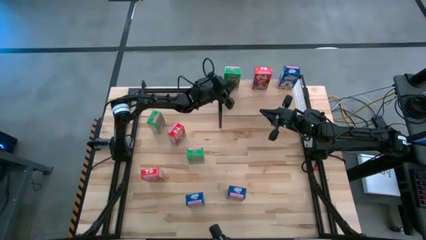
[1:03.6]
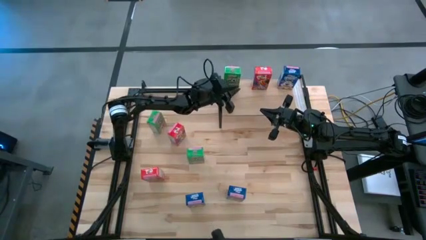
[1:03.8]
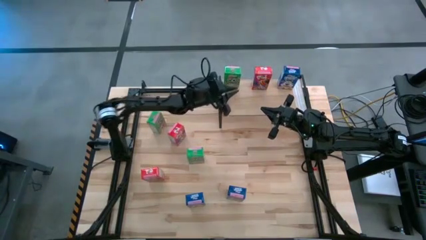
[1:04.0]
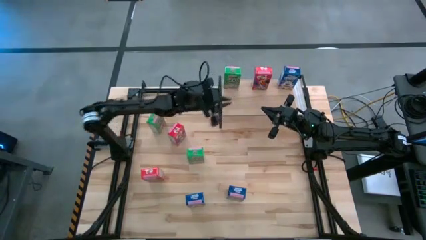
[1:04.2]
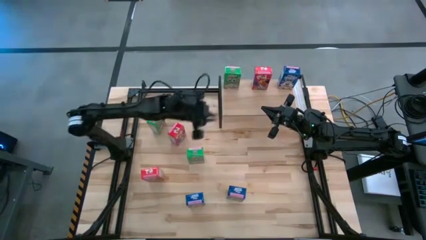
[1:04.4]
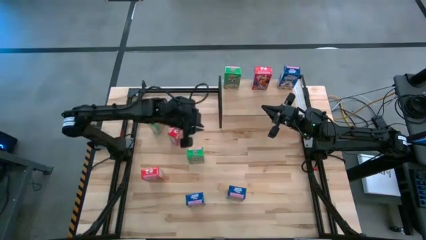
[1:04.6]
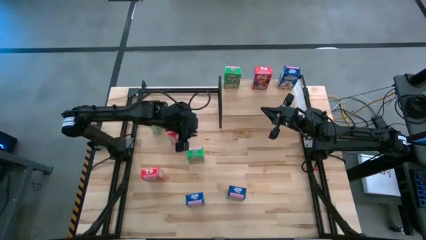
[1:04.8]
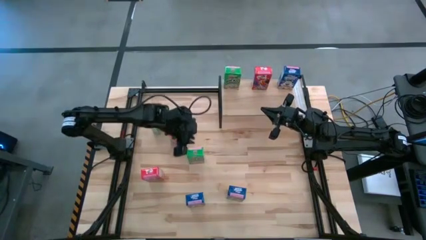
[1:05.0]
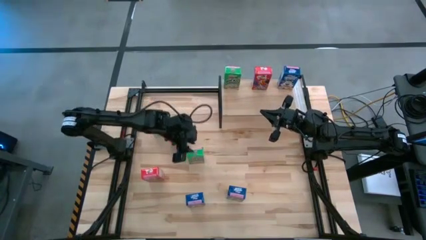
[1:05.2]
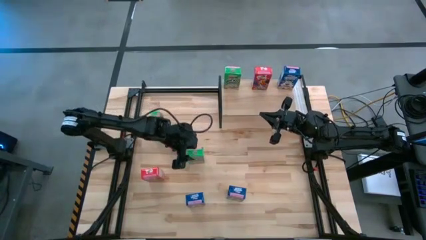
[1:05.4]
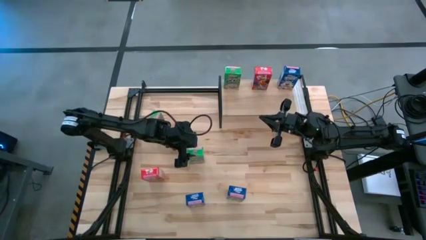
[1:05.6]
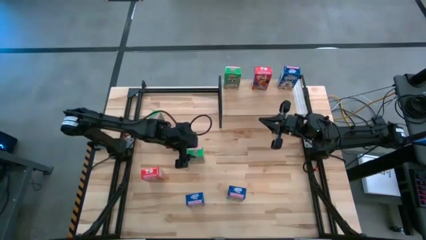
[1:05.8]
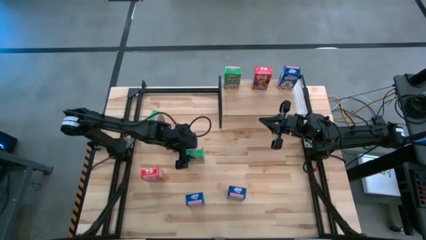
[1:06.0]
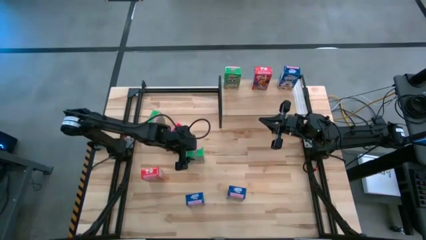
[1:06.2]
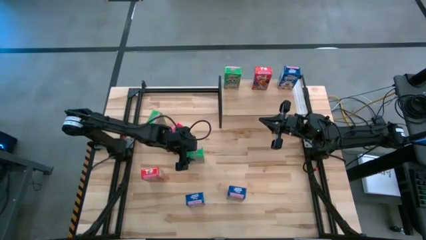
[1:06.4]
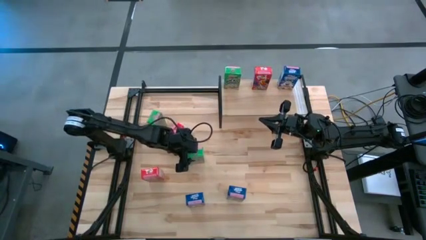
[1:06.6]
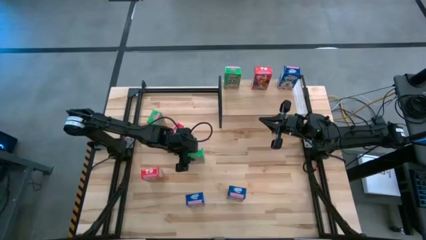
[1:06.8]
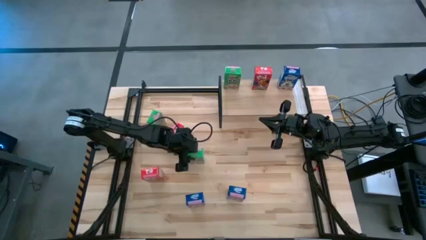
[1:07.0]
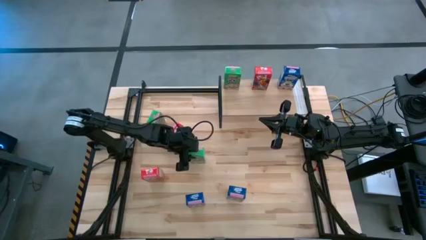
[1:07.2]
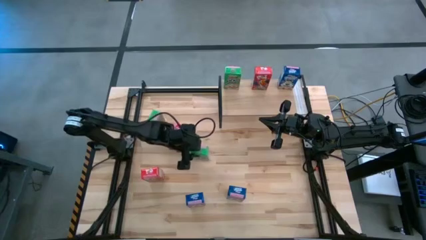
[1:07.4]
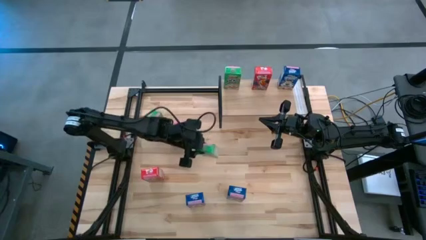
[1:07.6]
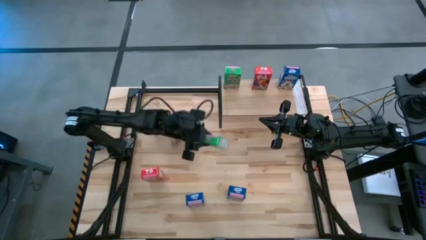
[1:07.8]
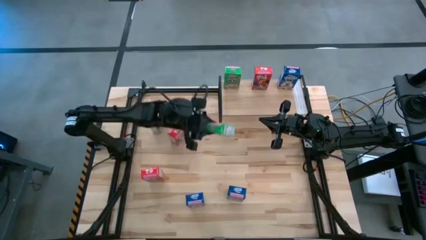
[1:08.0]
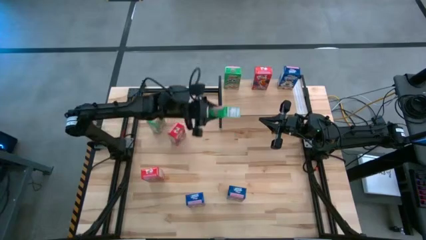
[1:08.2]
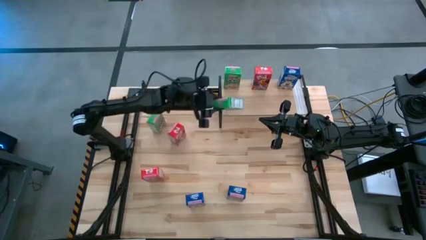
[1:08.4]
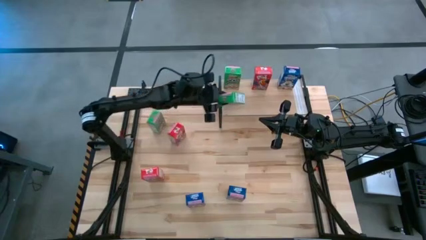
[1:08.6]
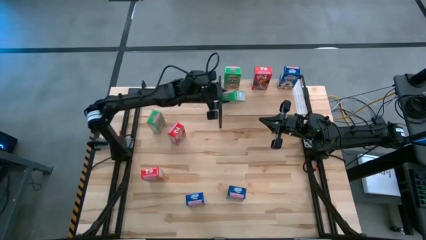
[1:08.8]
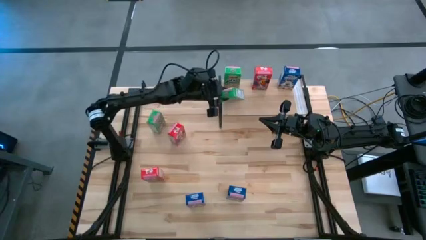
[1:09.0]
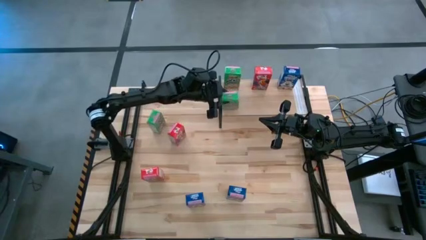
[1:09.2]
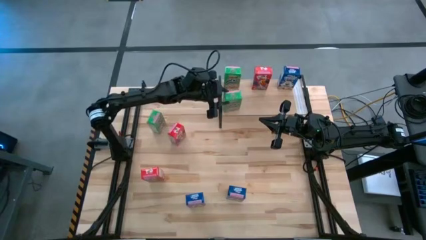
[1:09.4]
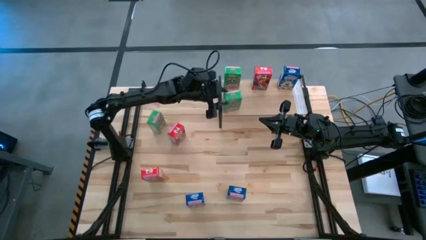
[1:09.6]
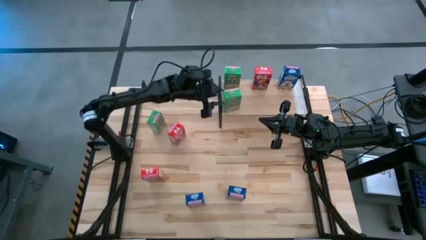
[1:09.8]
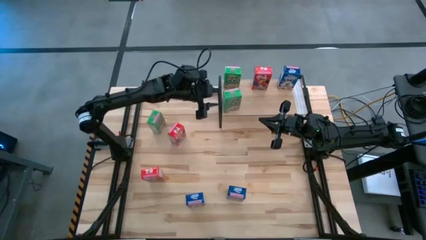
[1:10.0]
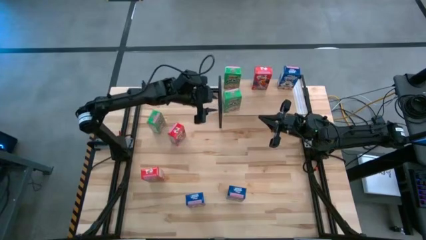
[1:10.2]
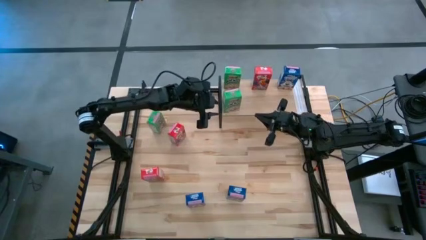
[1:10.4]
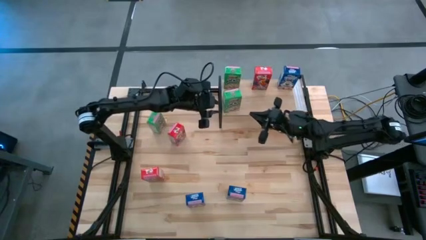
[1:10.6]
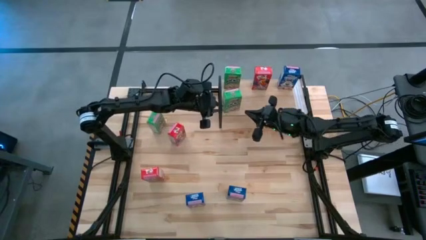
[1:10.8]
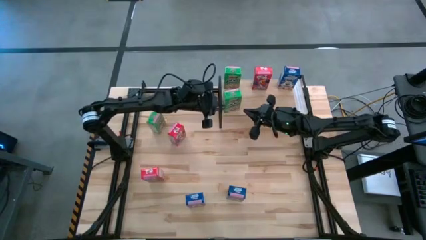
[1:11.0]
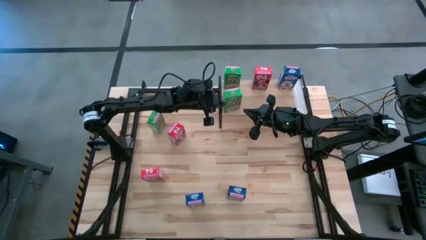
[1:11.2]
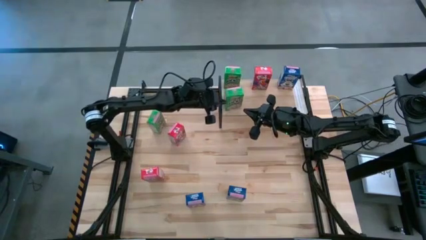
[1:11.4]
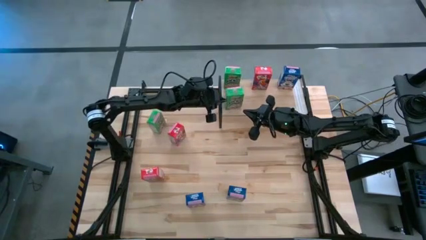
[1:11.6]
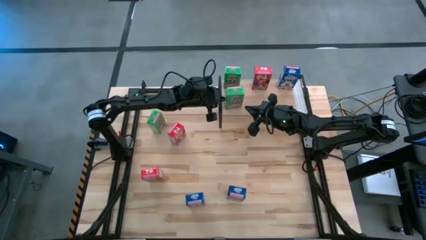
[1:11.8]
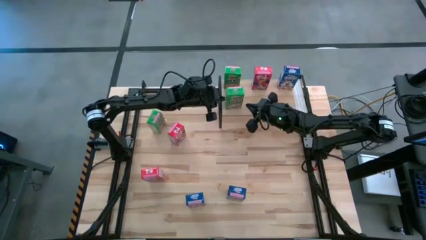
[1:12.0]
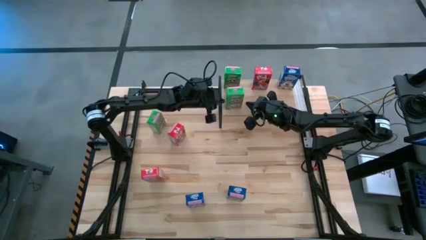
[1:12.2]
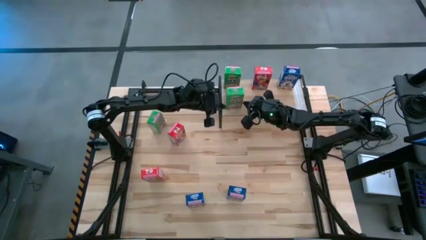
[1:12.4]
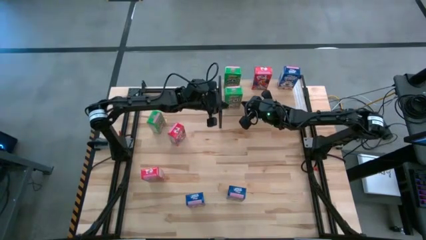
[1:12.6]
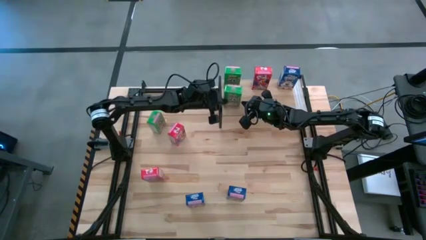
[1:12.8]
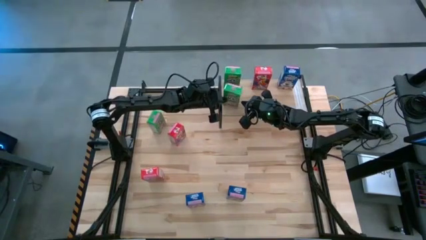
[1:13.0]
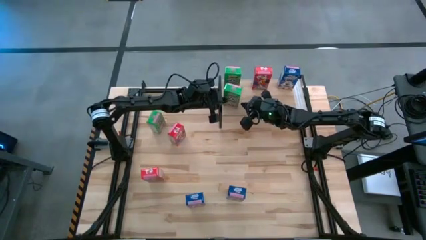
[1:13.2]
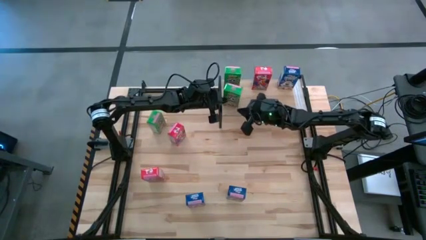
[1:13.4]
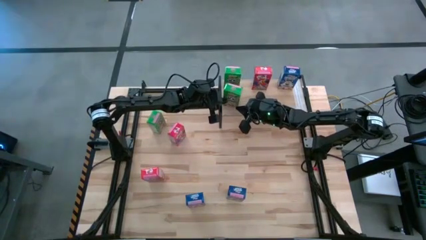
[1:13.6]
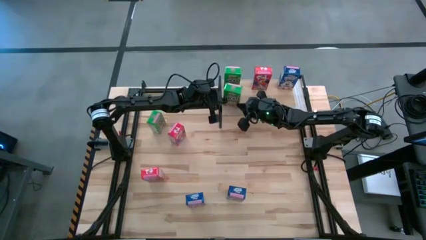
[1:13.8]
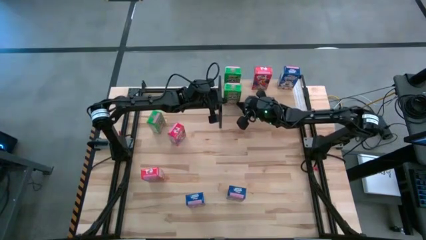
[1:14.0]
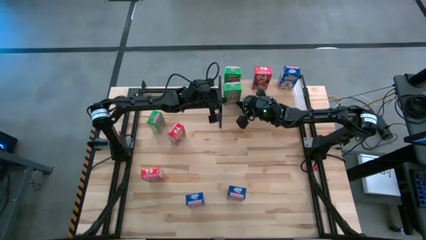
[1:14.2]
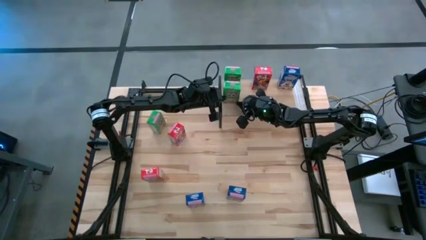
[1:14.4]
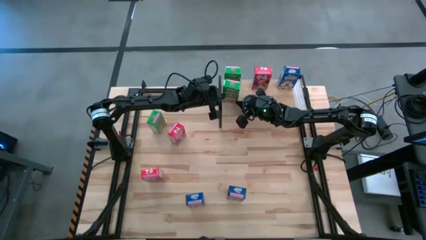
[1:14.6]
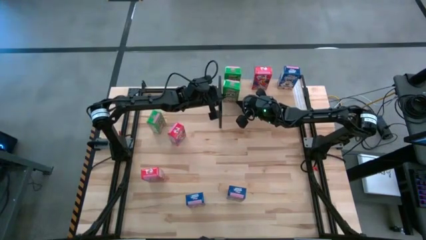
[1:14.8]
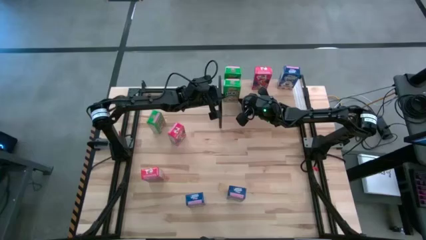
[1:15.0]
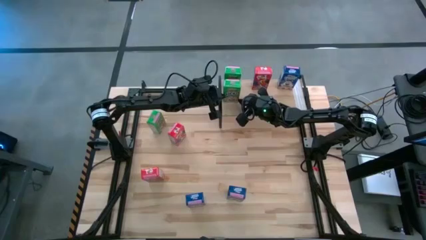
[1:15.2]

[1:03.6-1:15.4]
Task: Stack cereal on shelf
Put the bottom green cereal box on the shelf aligned with other green cereal boxes

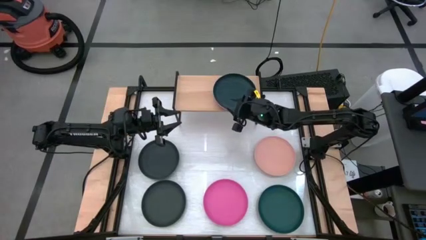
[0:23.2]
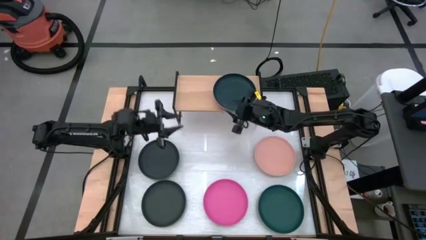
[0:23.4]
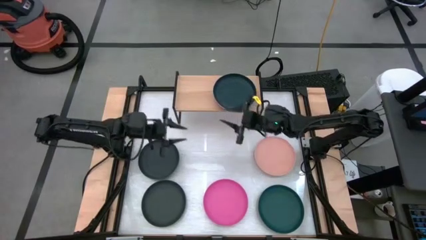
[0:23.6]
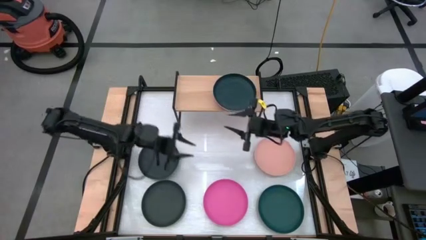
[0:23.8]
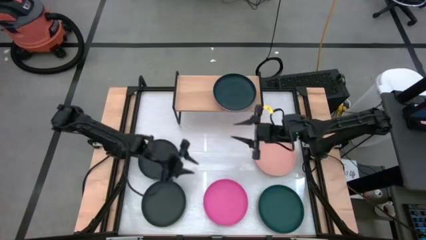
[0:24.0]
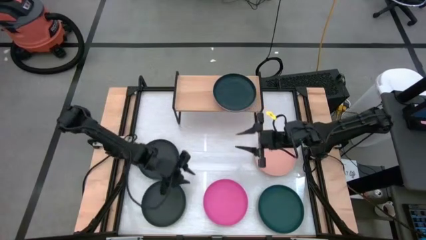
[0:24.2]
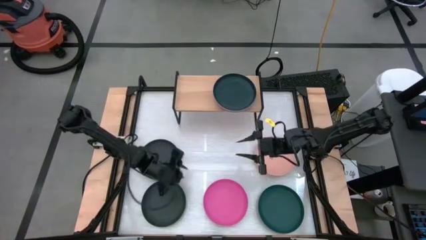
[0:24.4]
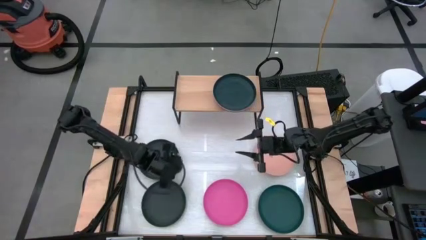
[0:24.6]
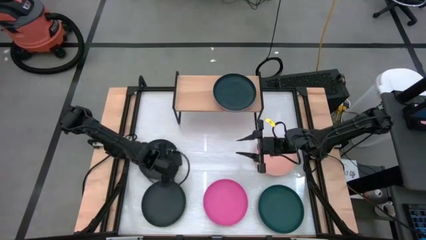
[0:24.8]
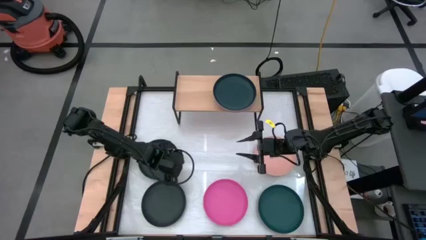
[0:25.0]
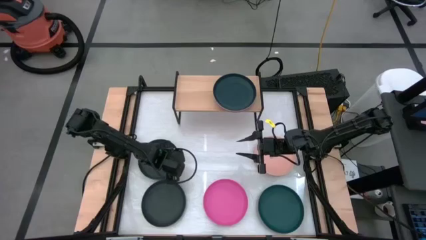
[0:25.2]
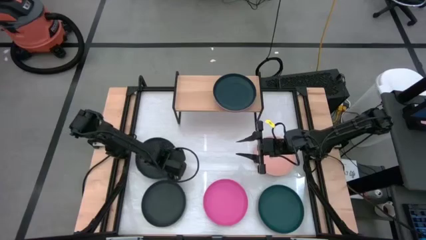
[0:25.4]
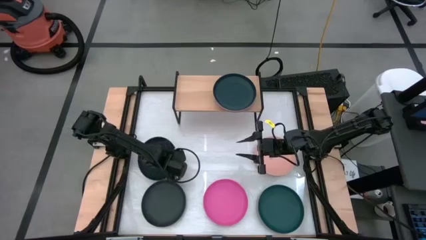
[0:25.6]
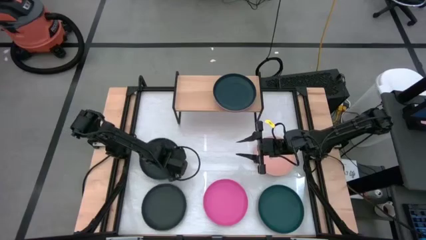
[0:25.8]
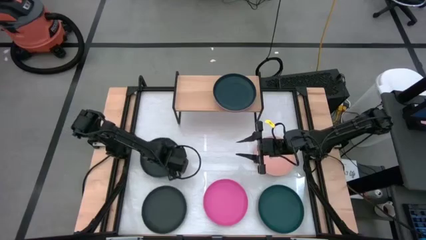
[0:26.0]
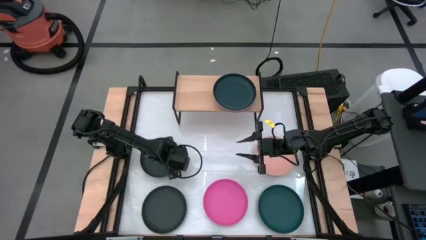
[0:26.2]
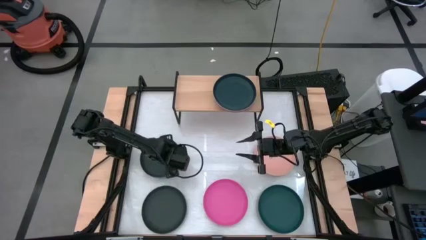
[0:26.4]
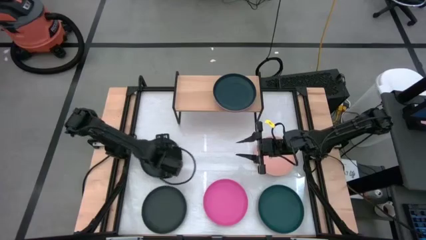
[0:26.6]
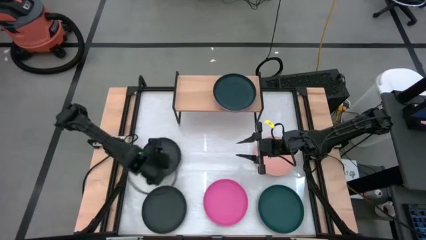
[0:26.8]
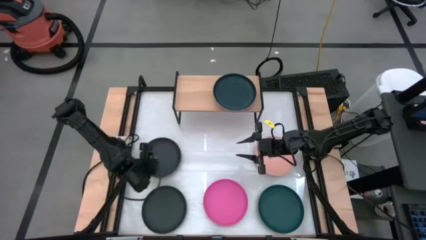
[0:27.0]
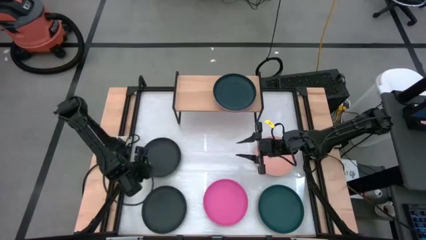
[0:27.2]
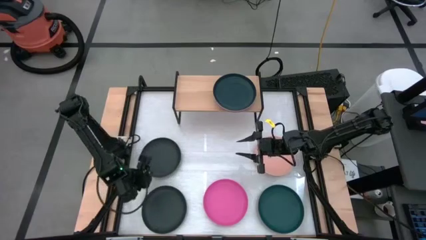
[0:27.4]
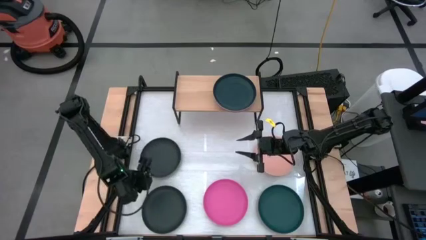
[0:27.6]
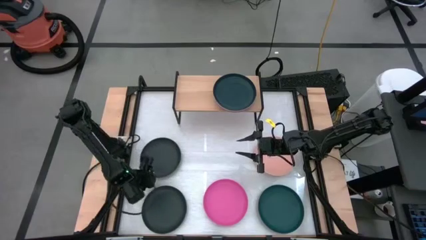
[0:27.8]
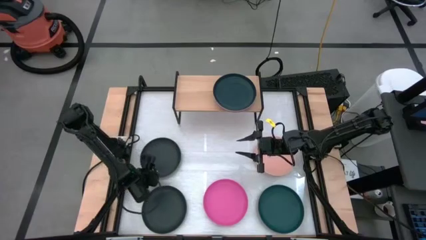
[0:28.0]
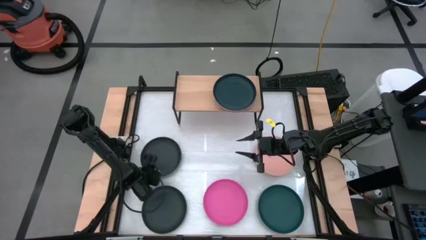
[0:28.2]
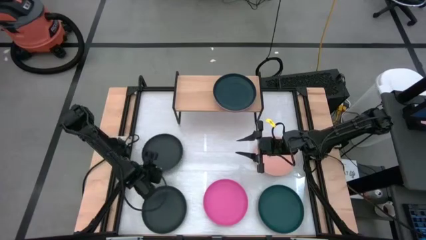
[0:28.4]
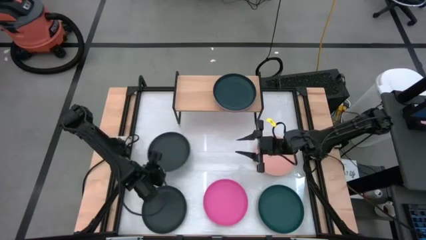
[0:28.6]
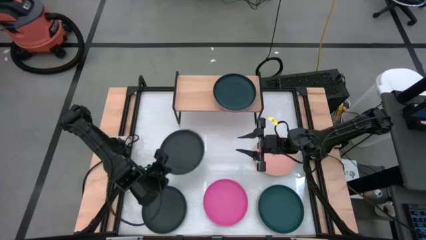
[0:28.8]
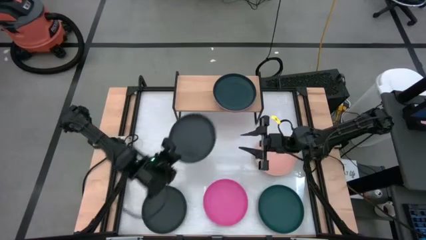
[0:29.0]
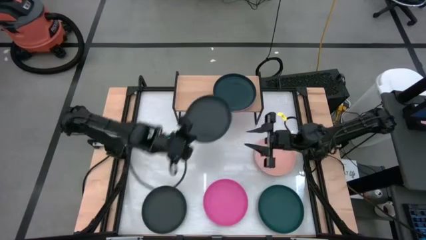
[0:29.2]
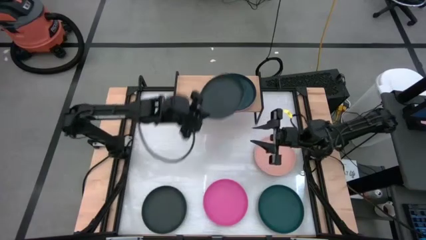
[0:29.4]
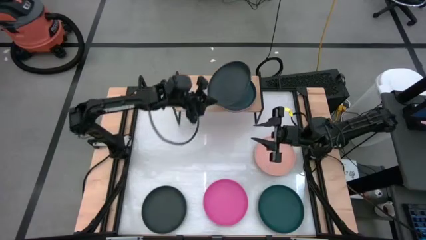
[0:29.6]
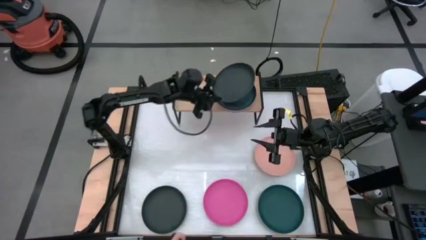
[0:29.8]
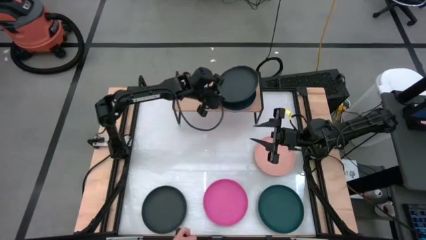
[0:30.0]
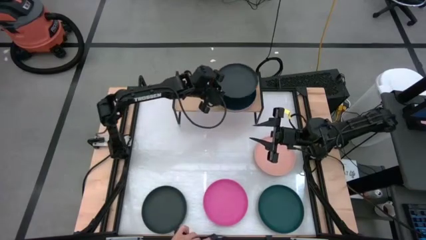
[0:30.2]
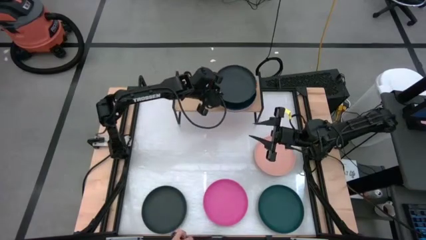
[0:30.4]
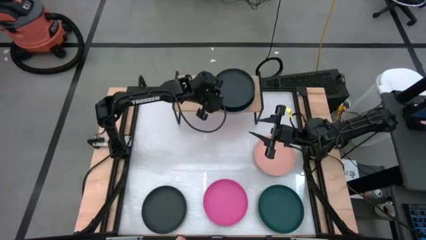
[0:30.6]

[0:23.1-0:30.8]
Task: Place and stack plates onto a shelf
Stack the top black plate on top of the dark blue plate on top of the shelf
